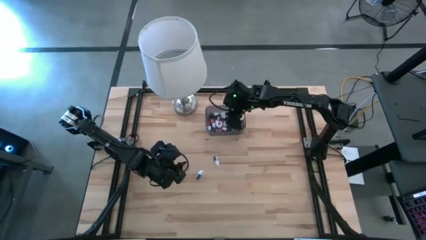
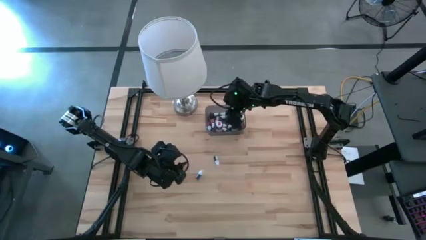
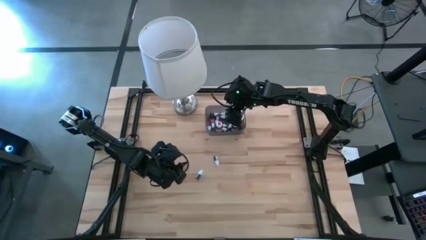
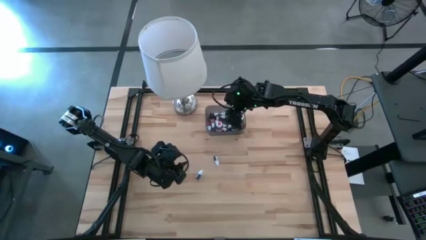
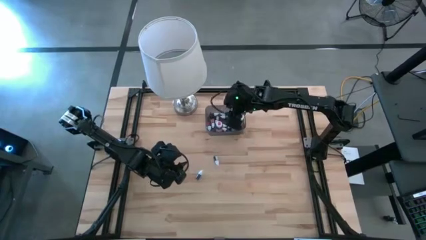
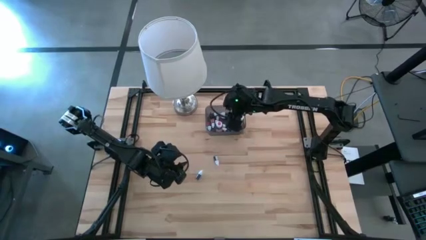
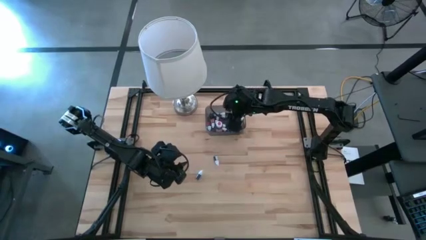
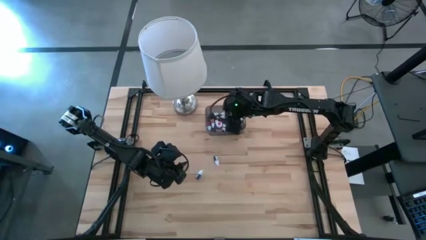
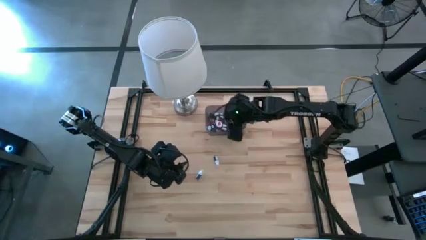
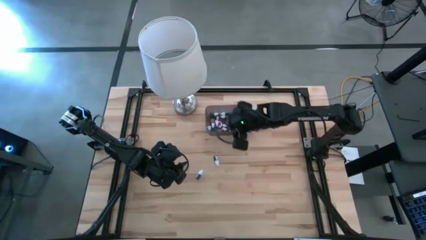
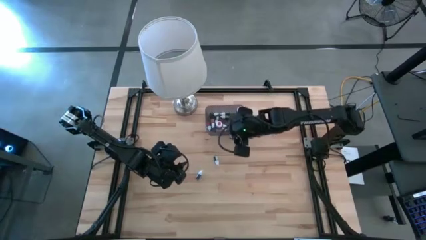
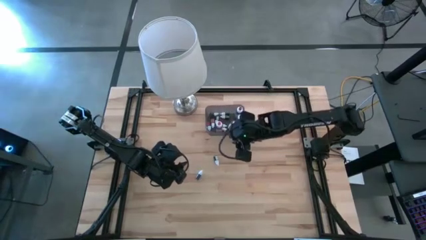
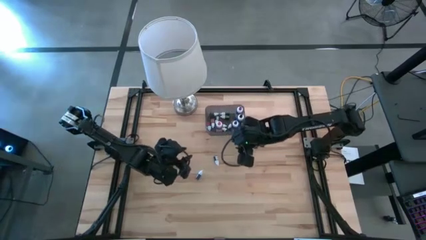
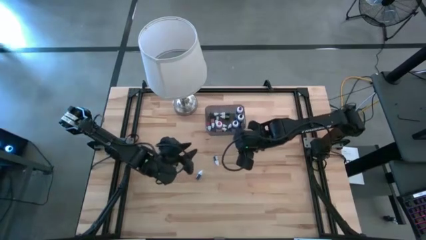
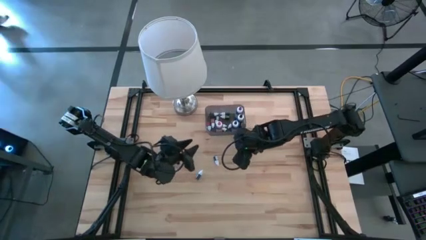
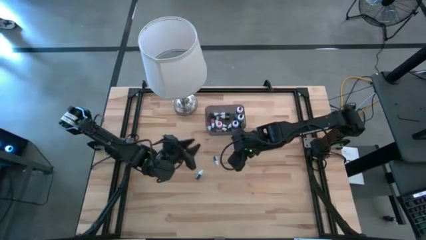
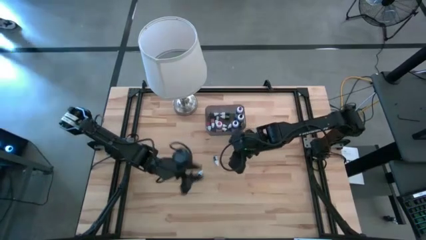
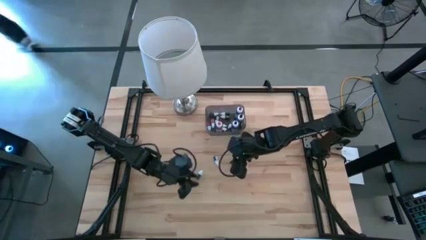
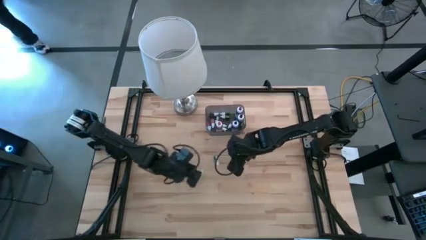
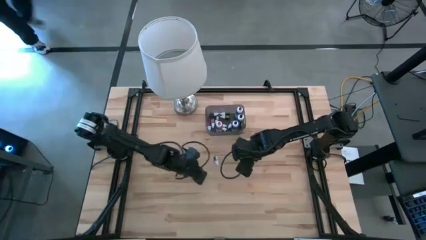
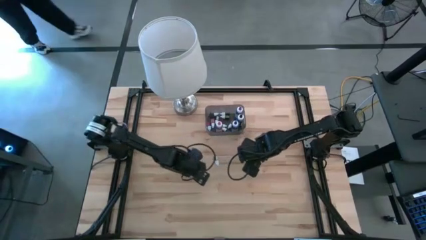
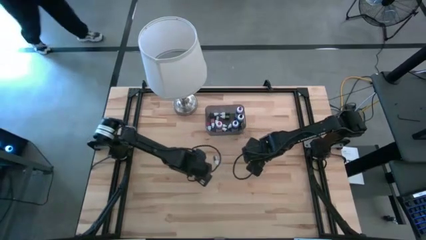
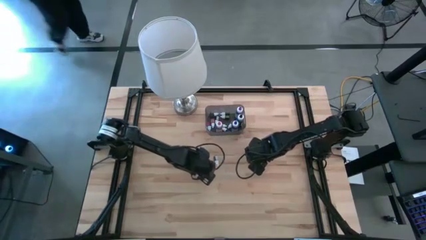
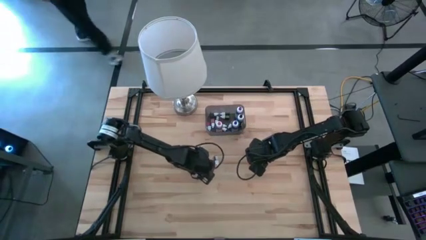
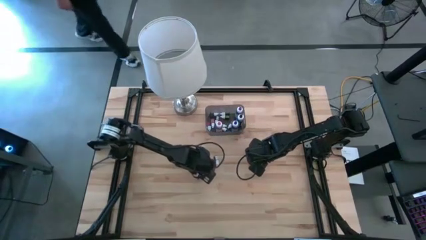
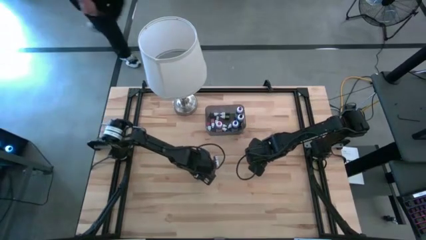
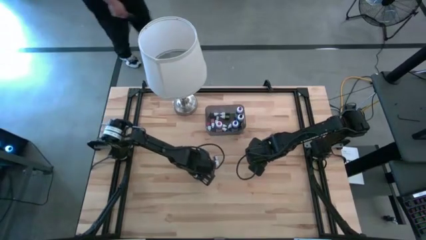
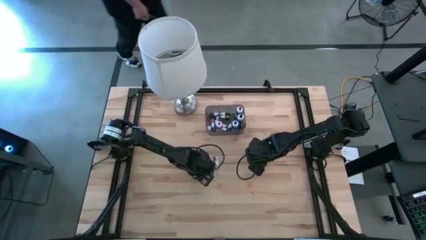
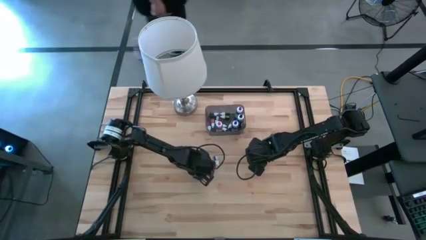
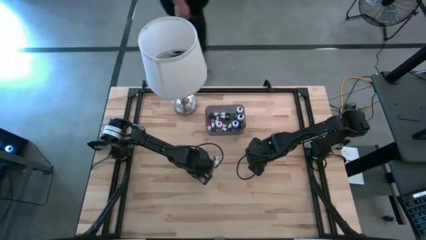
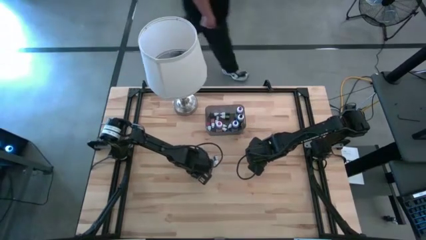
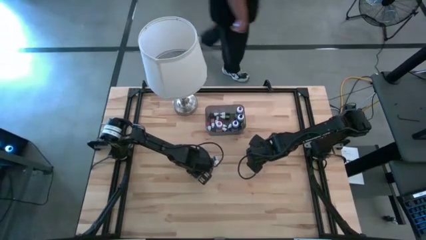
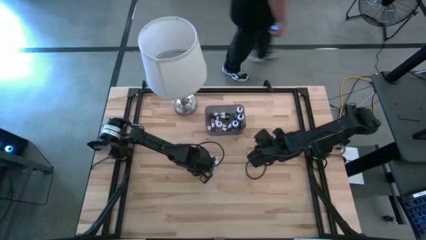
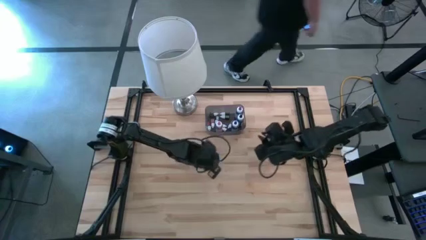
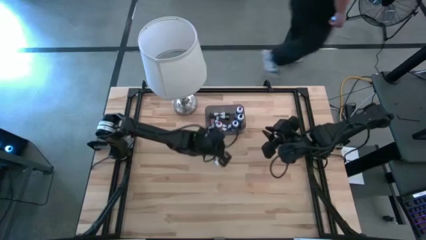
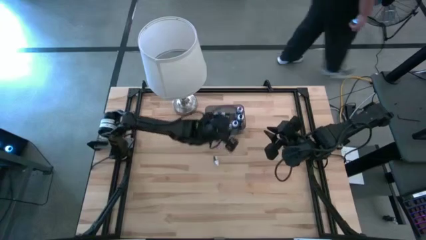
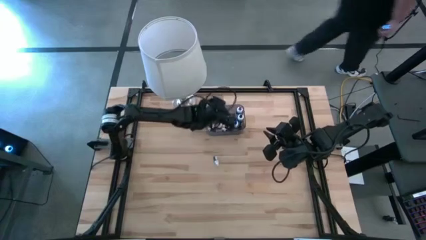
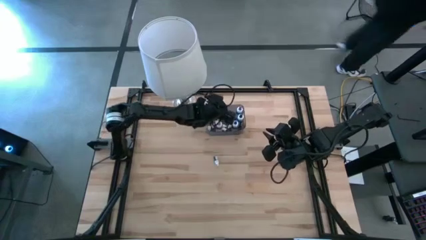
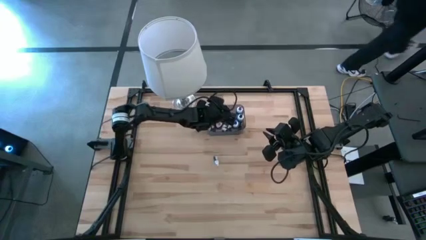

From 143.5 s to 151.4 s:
Task: Pick & Place food coloring
Put the small light blue food coloring bottle into the bin

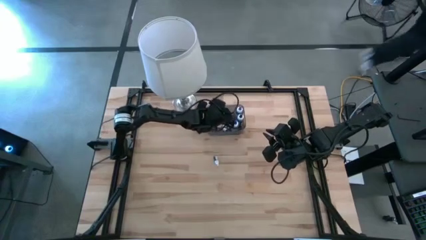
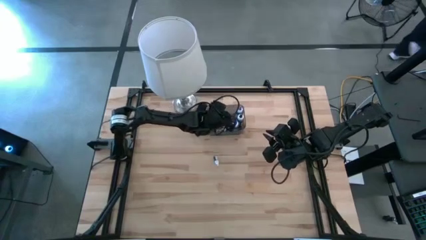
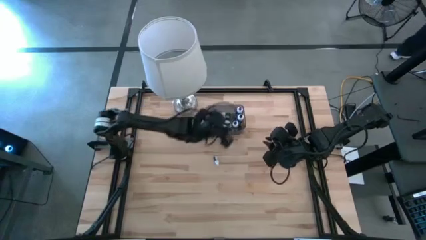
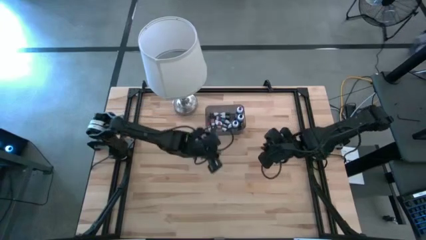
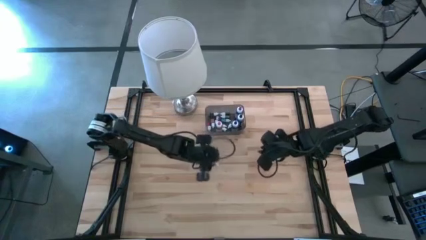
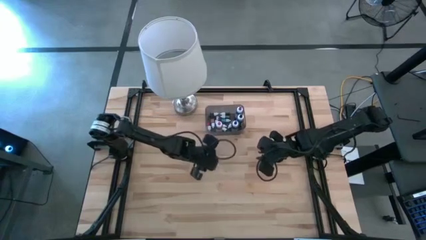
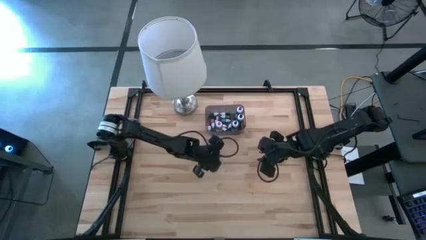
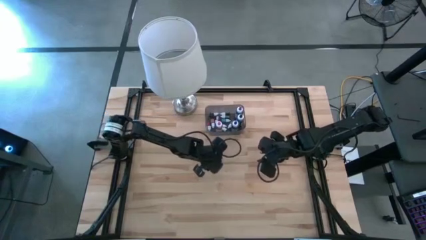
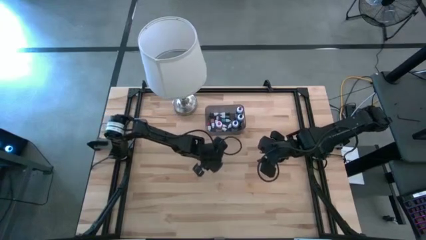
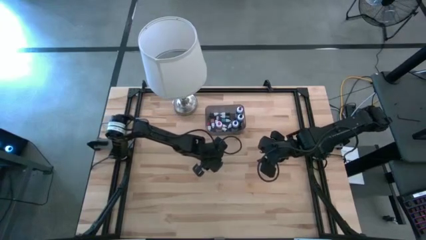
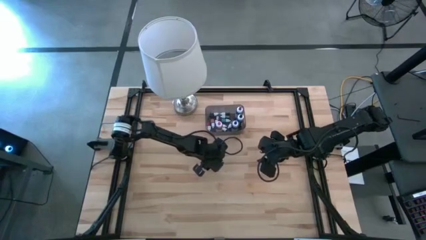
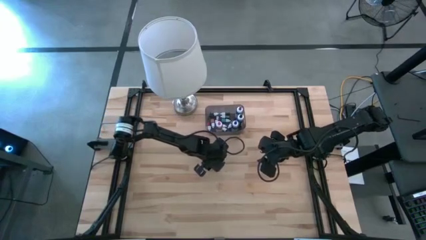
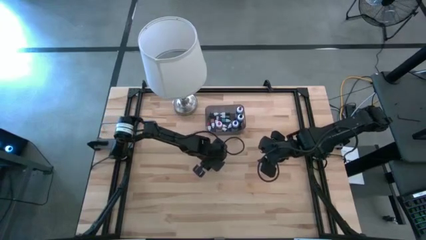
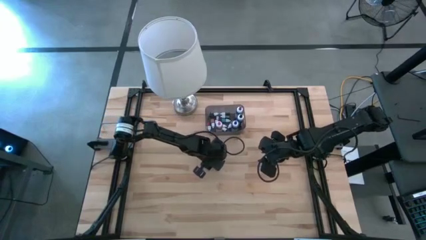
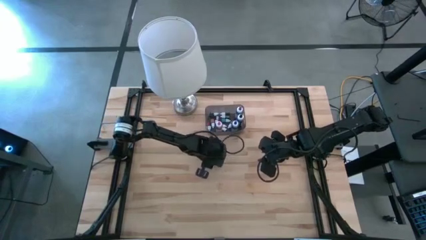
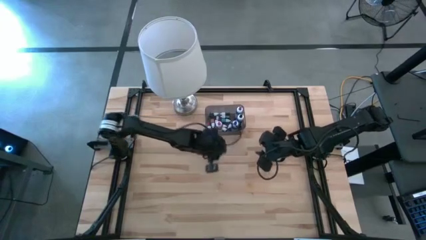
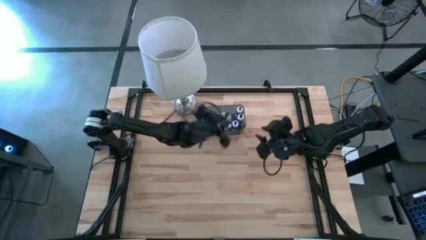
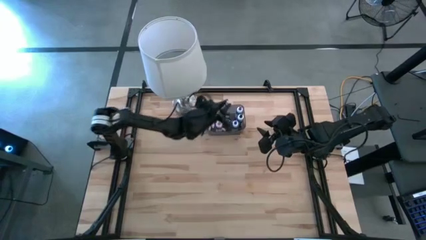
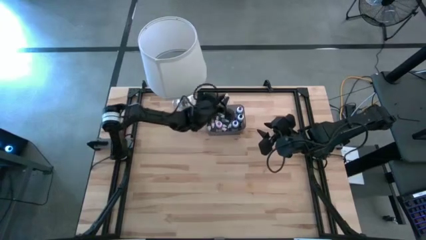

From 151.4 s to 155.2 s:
Put the small black food coloring bottle into the bin
